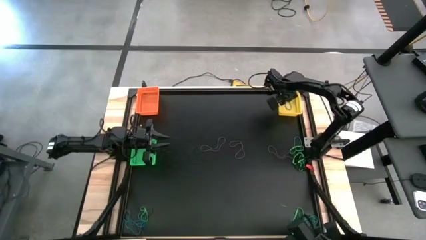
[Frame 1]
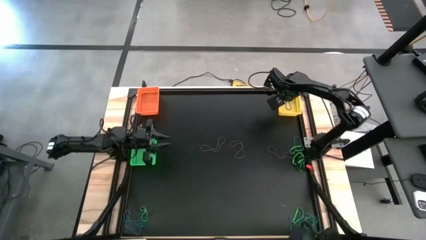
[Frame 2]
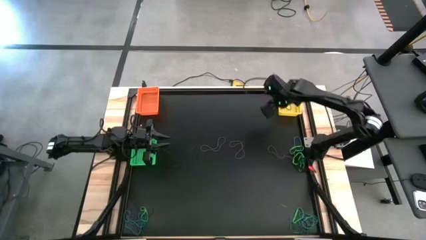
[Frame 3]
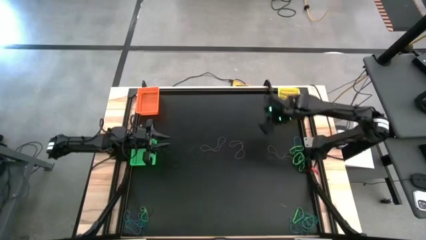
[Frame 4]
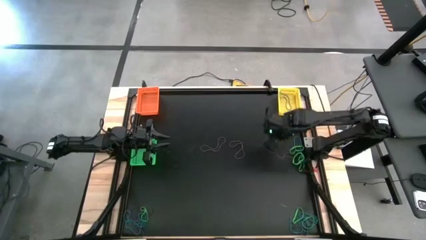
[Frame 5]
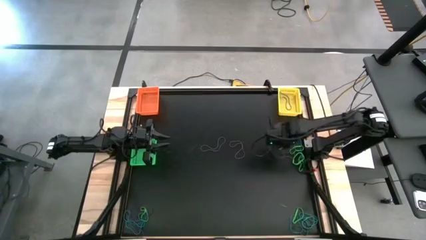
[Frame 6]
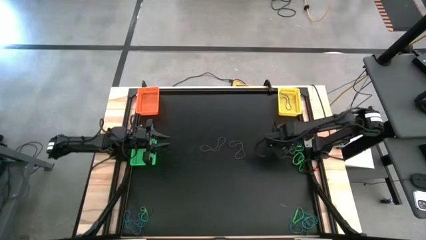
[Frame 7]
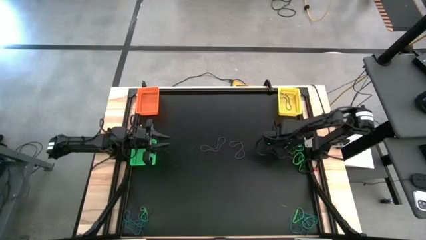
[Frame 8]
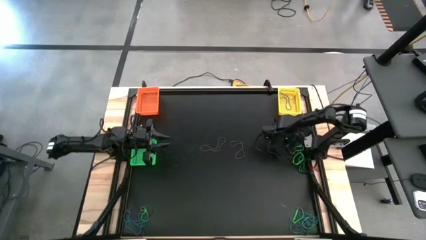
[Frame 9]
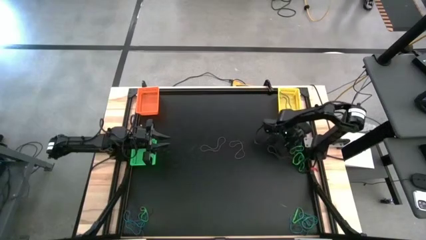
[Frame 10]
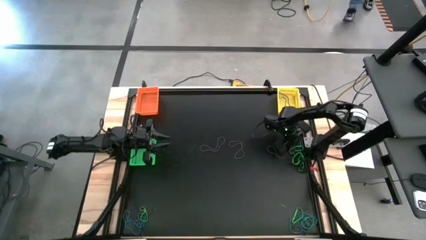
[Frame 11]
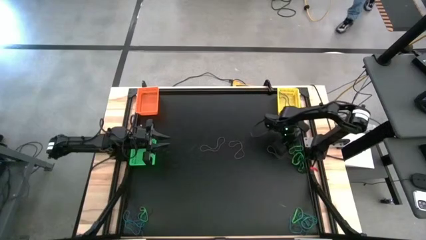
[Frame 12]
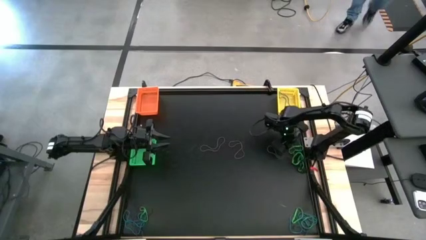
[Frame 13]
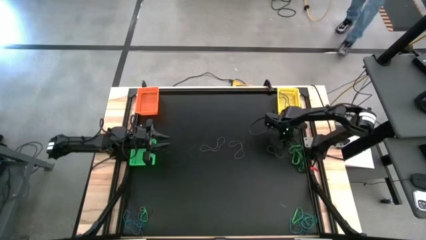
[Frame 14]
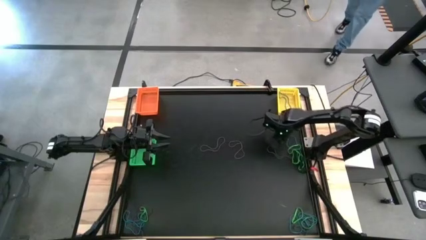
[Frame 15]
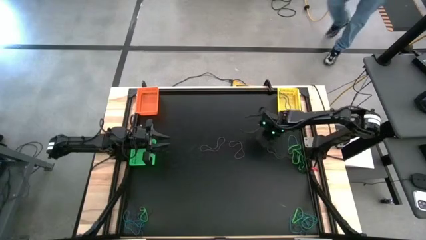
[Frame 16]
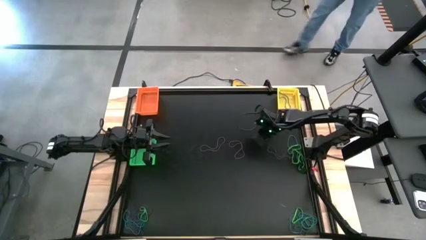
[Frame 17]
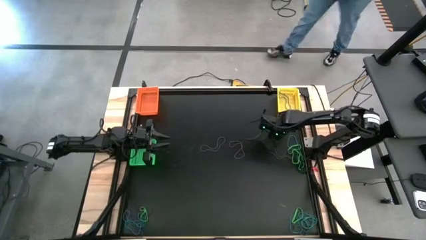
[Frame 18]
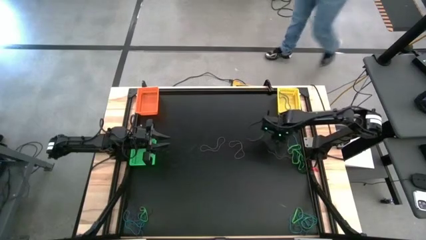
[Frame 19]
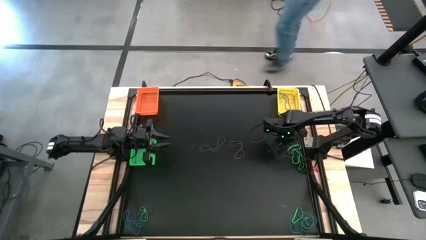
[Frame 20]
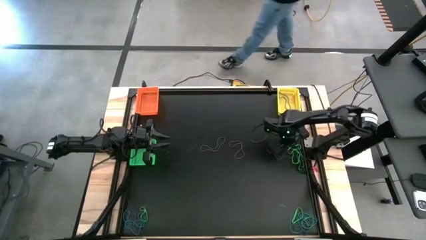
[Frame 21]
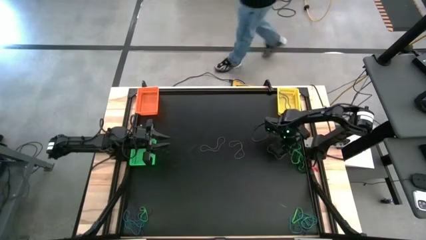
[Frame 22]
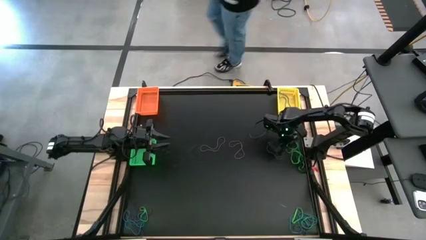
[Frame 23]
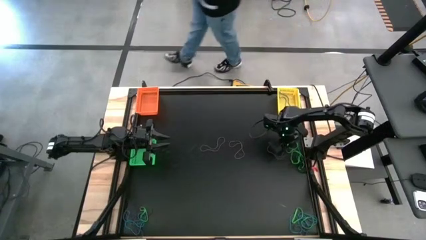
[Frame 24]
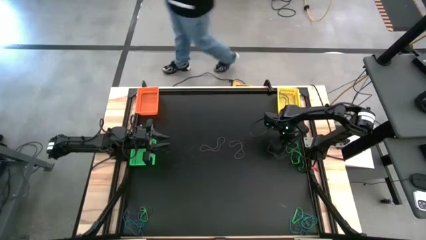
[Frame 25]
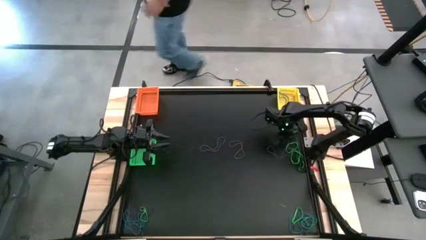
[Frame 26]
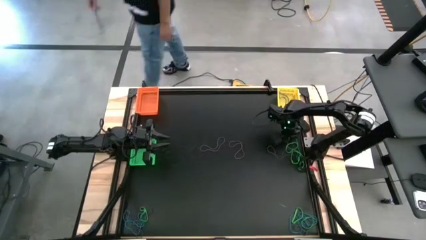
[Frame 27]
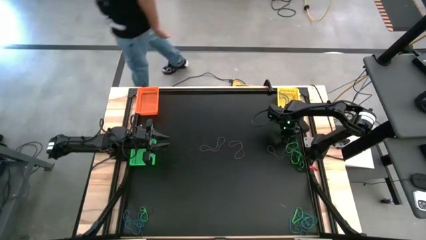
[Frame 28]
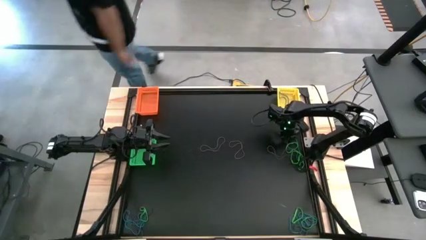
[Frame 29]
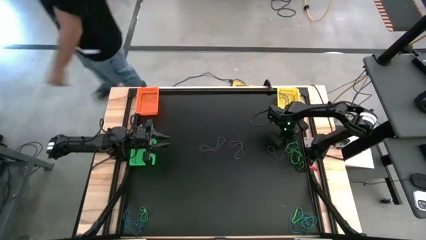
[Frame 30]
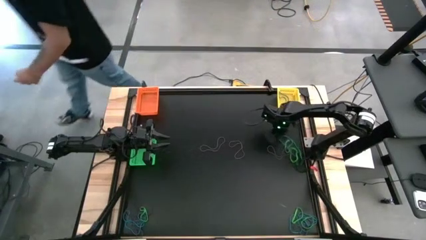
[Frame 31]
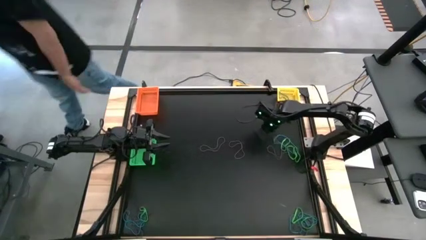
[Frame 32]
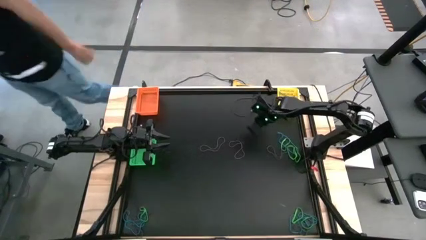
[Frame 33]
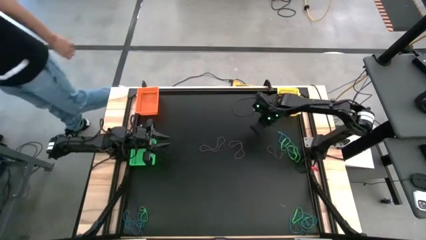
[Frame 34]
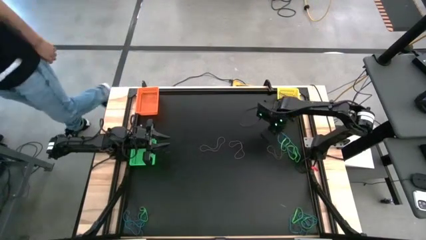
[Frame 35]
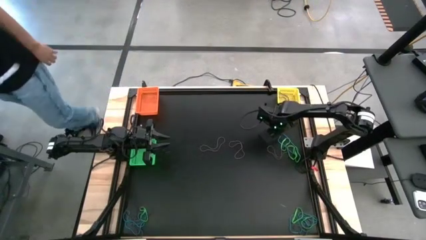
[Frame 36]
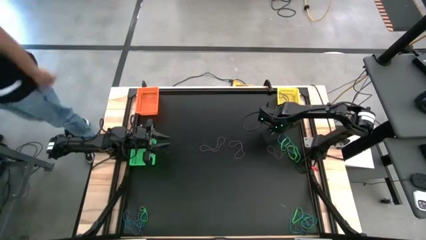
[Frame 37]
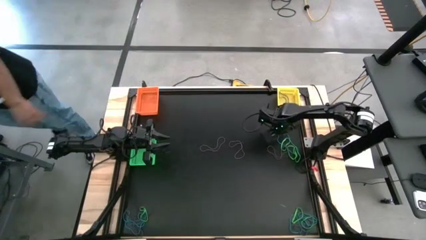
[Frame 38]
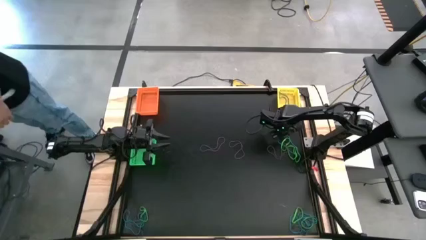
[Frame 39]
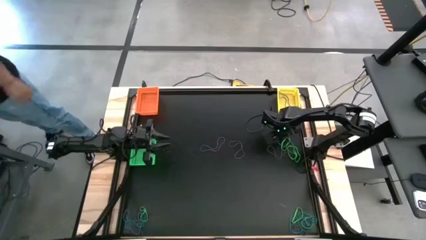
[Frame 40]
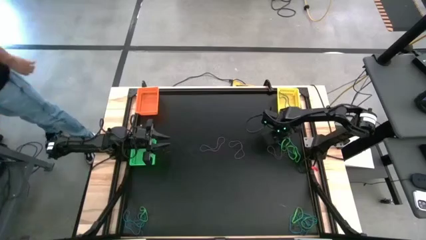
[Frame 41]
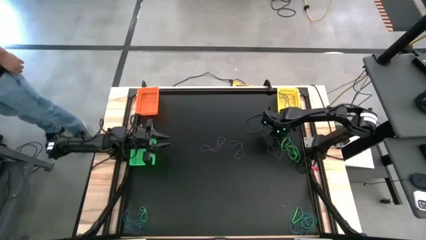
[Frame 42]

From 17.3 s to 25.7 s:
Task: Sort rubber bands into baskets
Put the middle right blue rubber band into the yellow bin

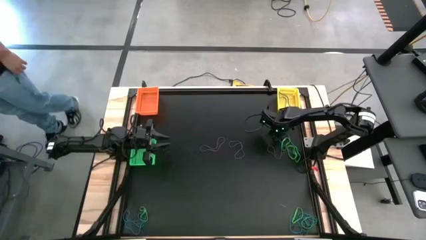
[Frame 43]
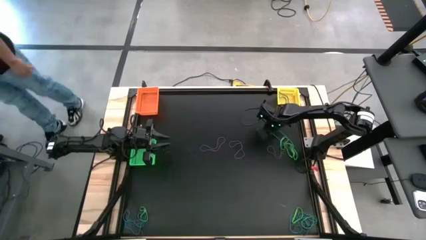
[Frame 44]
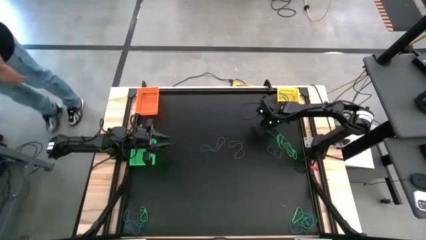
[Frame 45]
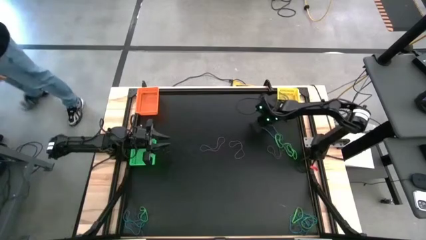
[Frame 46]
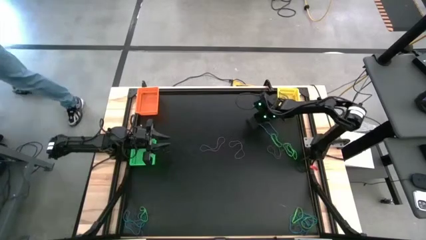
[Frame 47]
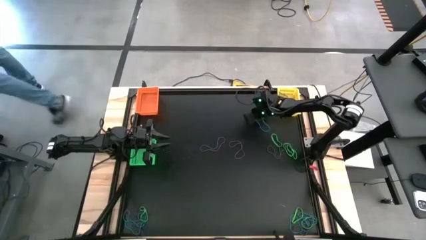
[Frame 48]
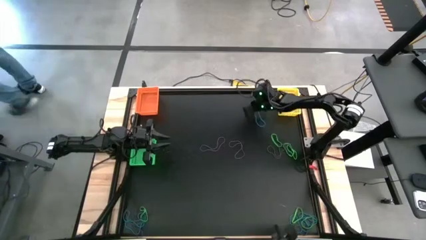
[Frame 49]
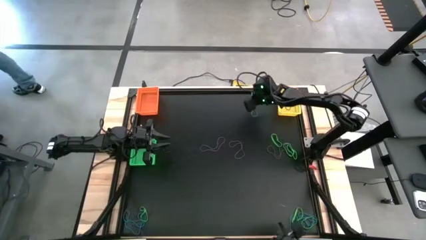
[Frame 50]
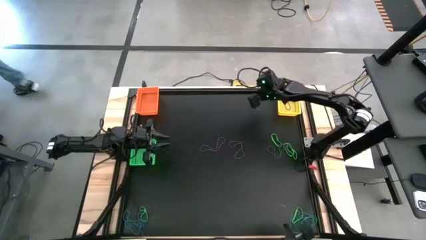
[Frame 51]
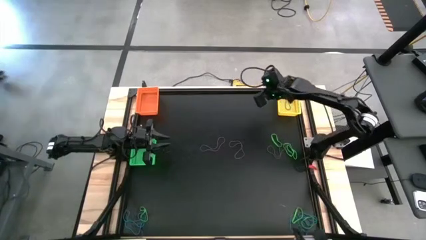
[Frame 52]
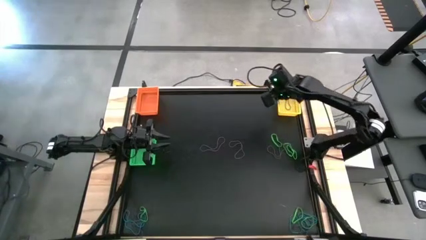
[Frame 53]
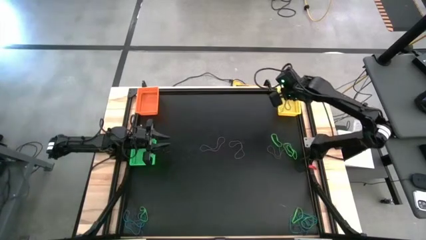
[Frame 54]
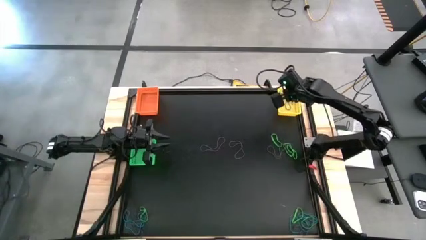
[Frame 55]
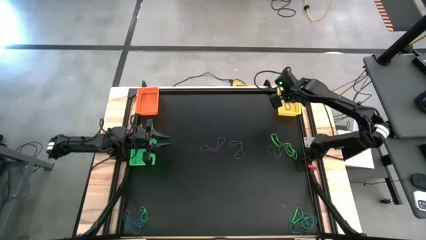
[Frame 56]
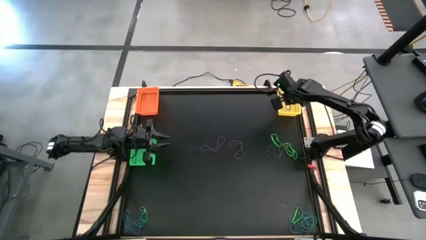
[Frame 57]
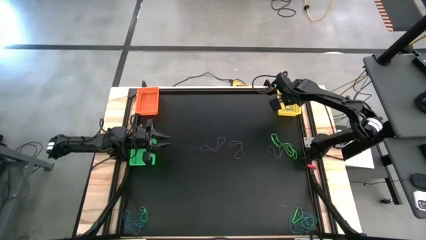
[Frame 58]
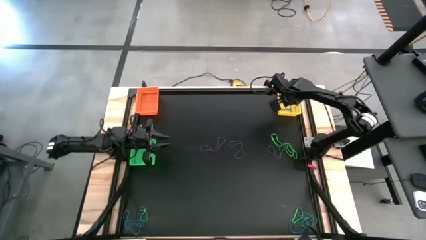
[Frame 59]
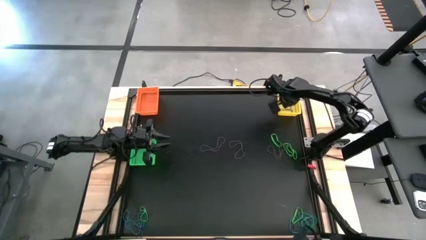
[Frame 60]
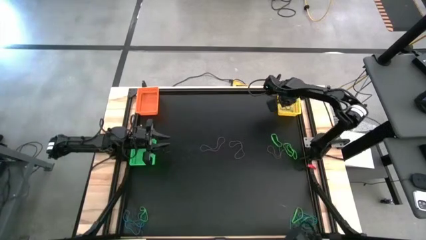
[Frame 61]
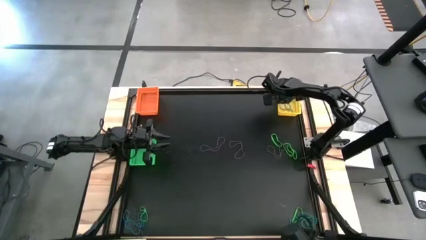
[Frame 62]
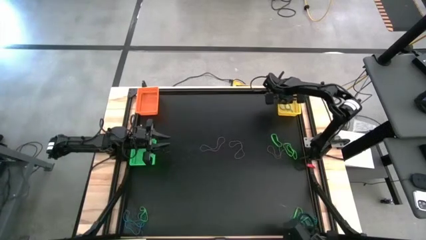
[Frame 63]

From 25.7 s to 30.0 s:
Put the middle right blue rubber band into the yellow bin

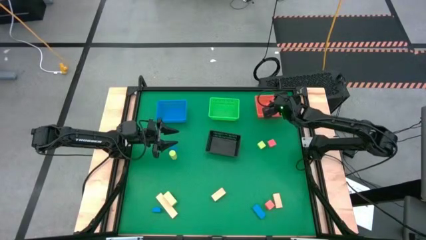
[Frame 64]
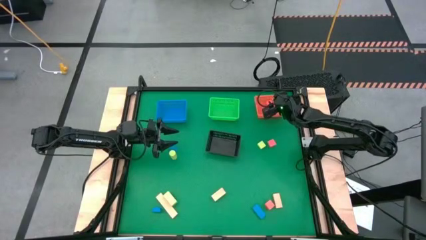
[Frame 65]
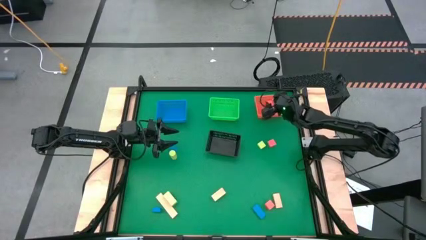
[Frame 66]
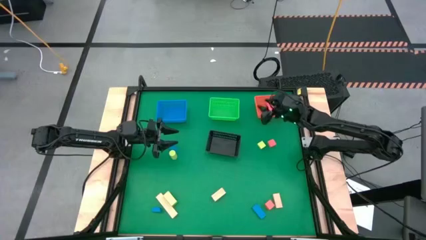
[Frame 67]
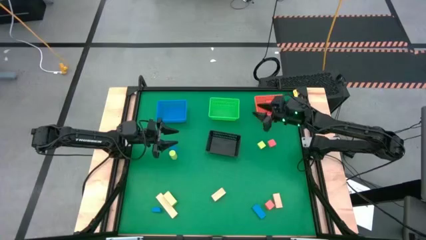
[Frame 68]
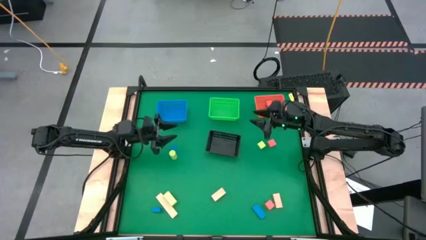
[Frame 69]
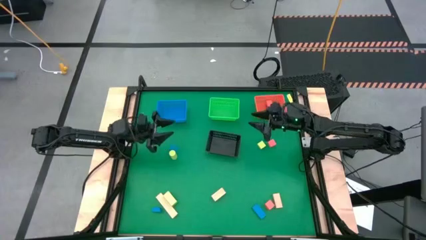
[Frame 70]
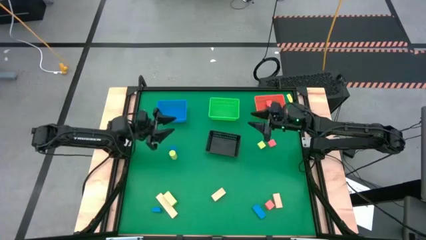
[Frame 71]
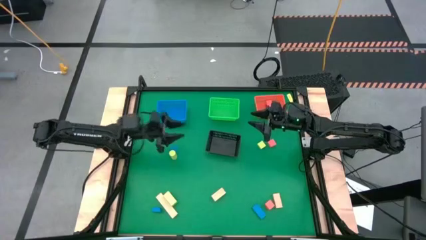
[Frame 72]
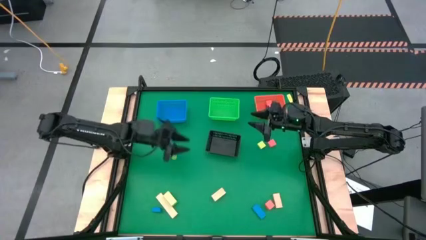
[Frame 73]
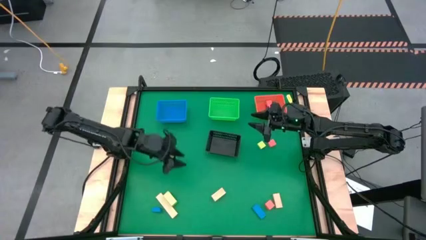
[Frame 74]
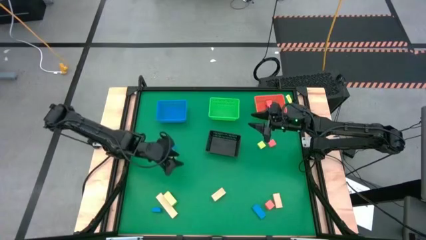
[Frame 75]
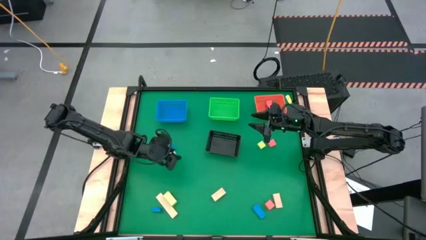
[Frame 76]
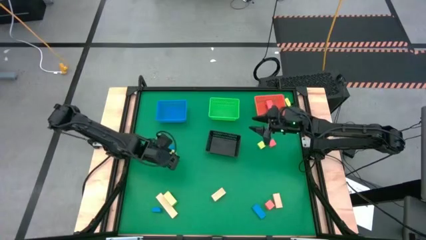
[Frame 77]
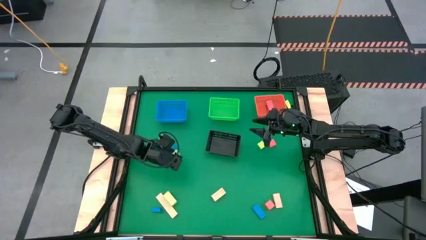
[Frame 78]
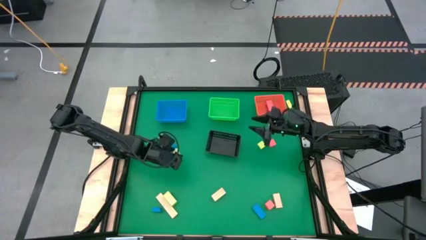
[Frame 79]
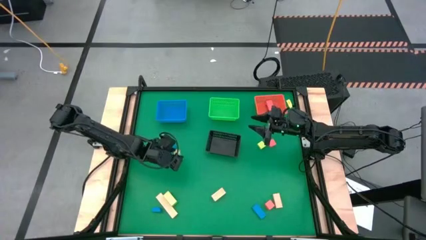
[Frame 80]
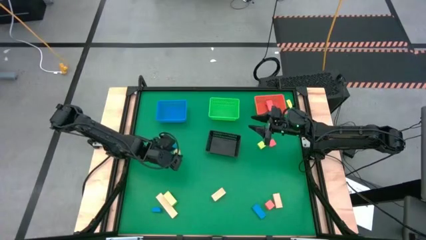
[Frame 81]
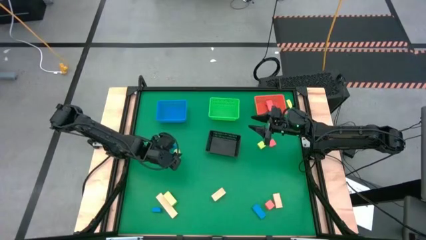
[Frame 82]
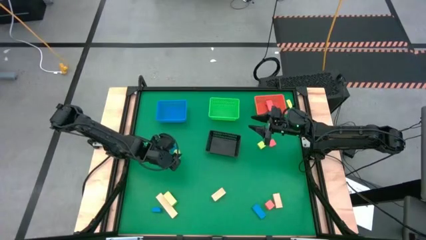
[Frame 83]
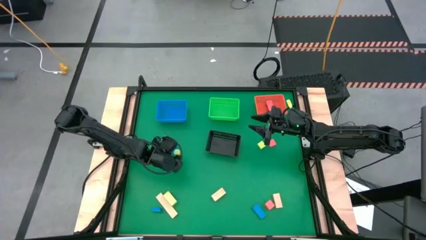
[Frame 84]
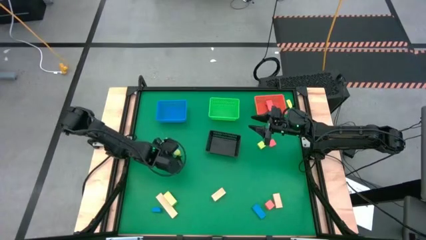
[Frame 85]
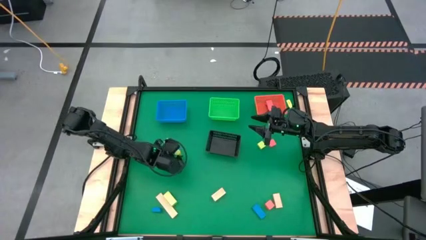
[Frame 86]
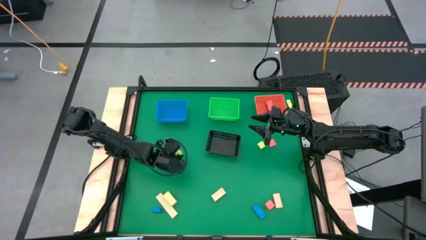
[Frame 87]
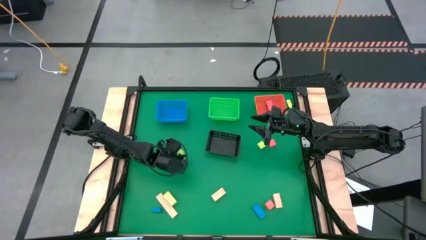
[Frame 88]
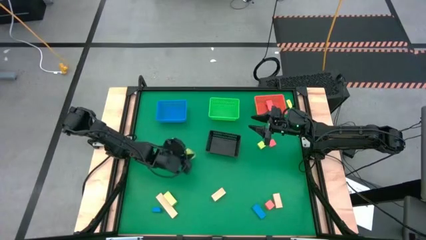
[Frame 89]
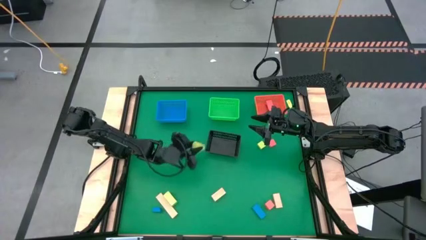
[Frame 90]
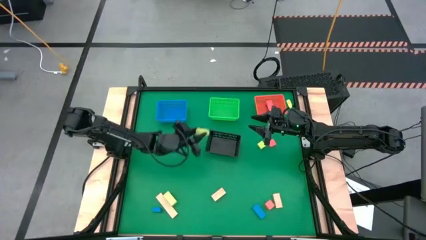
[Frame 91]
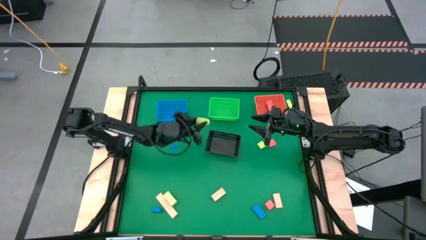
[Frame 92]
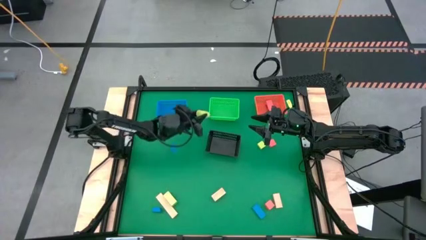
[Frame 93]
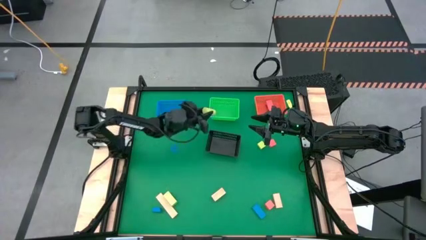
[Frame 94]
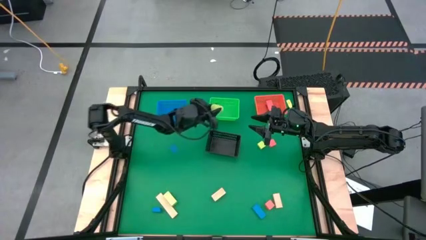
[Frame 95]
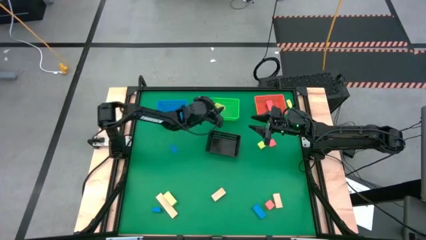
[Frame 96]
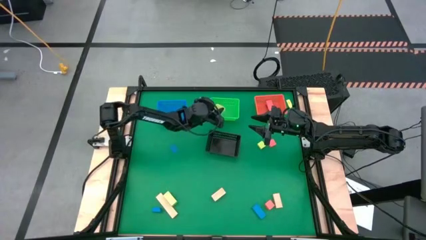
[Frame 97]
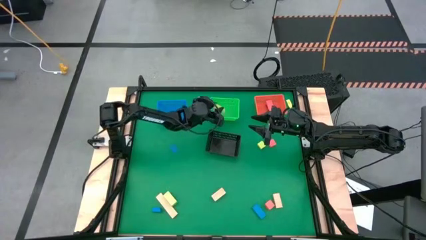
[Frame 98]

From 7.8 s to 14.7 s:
Task: Sort & place blocks by color
Put the top left green block into the green bin
